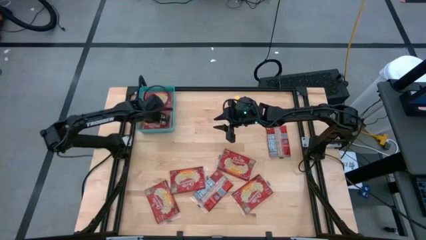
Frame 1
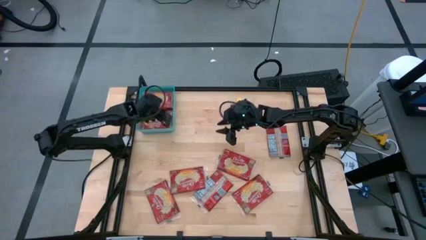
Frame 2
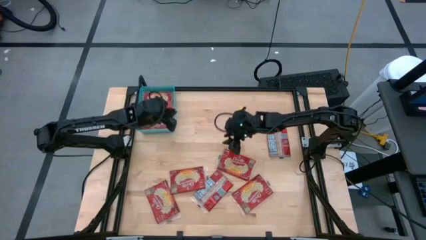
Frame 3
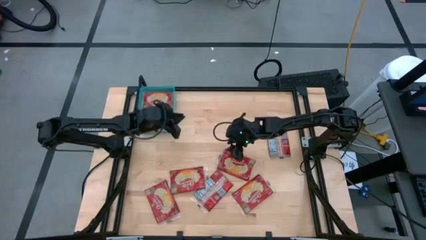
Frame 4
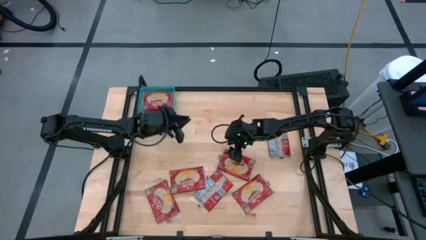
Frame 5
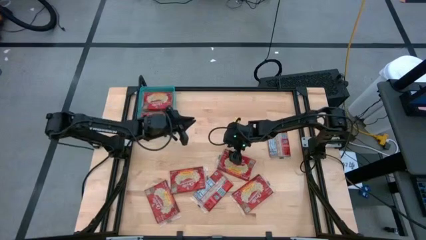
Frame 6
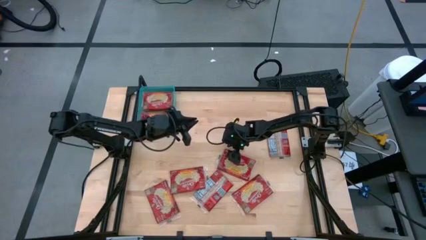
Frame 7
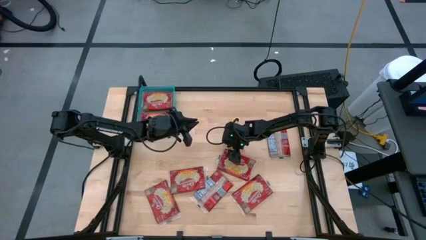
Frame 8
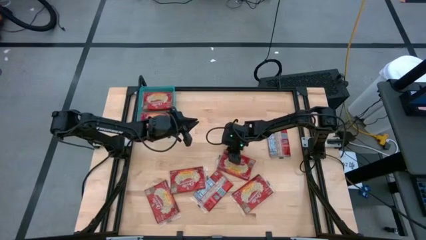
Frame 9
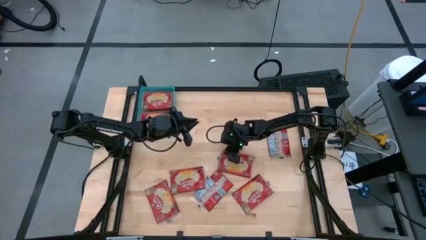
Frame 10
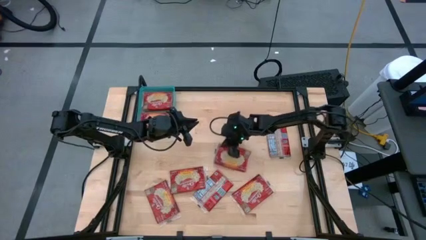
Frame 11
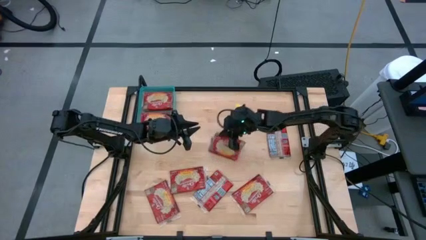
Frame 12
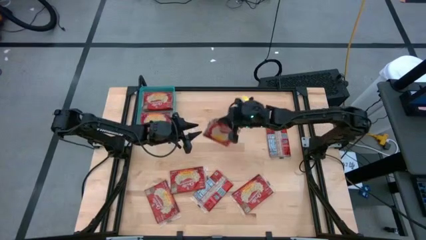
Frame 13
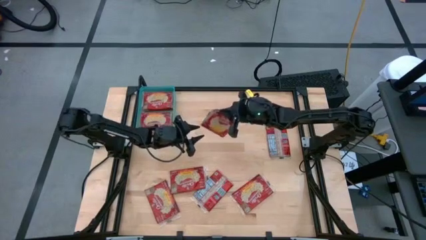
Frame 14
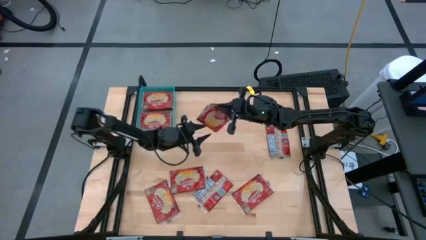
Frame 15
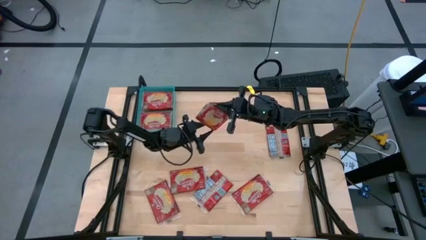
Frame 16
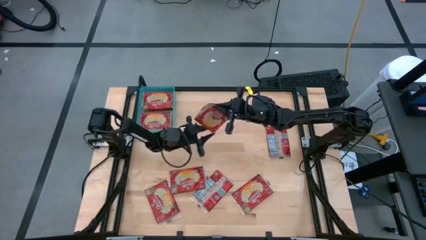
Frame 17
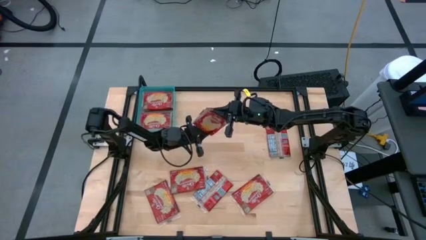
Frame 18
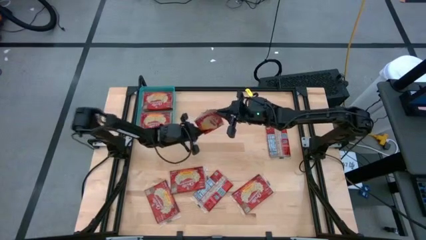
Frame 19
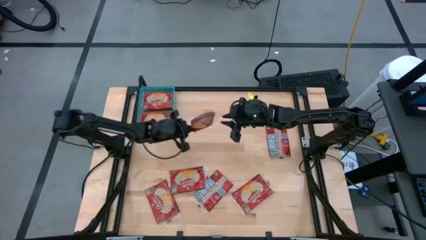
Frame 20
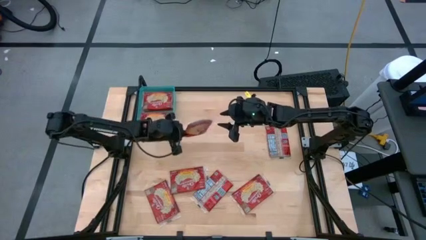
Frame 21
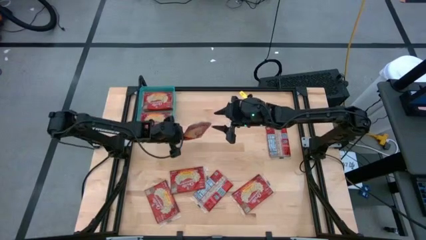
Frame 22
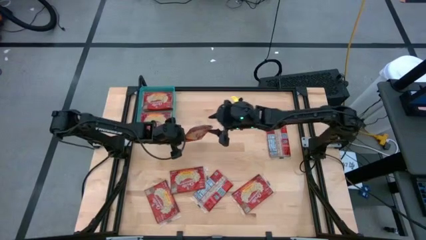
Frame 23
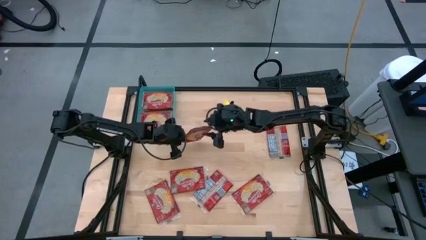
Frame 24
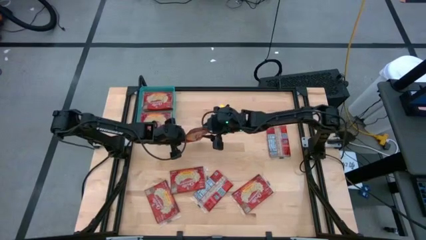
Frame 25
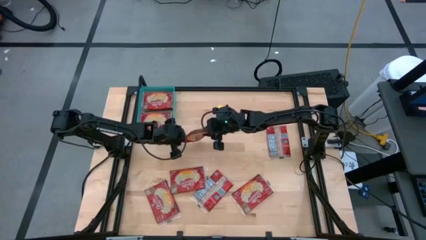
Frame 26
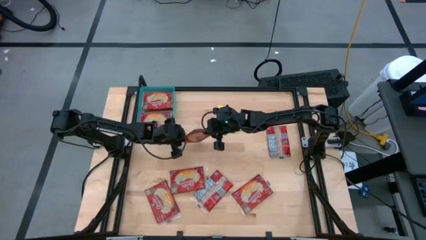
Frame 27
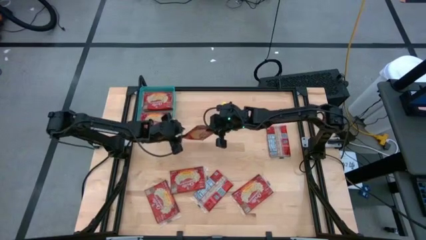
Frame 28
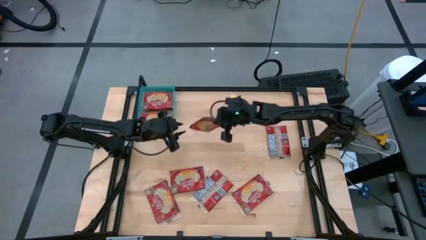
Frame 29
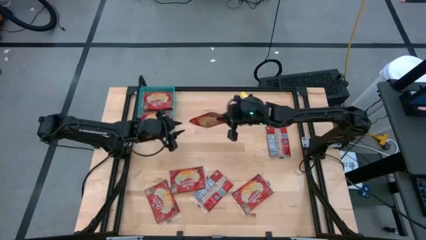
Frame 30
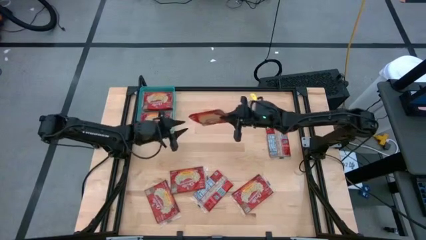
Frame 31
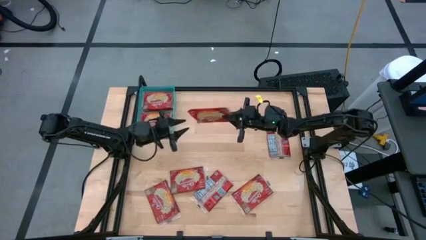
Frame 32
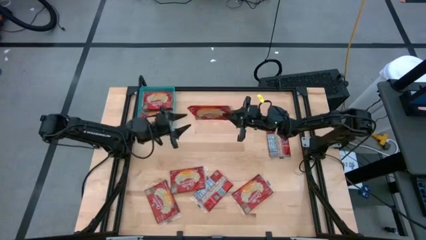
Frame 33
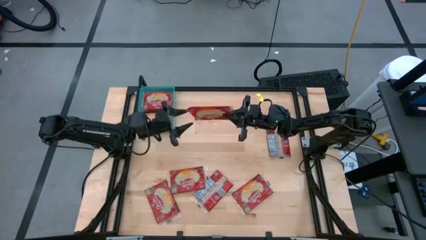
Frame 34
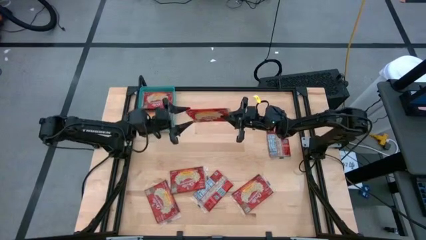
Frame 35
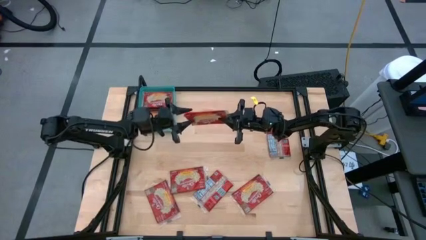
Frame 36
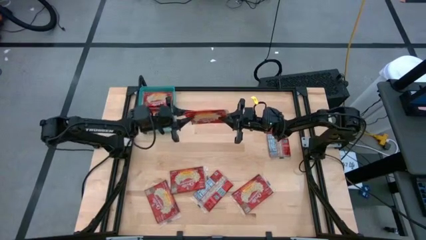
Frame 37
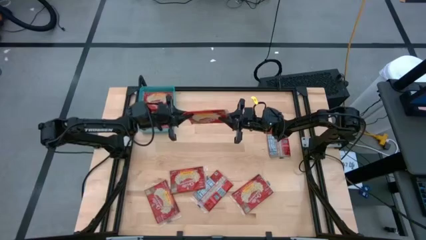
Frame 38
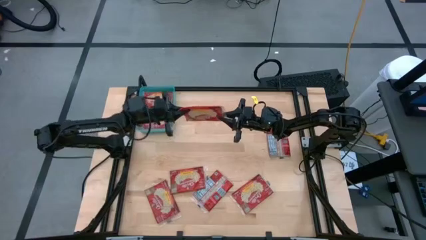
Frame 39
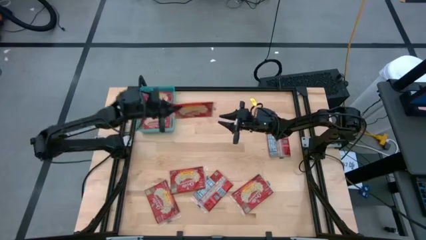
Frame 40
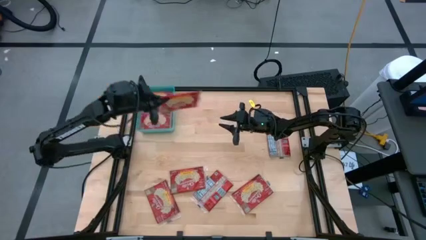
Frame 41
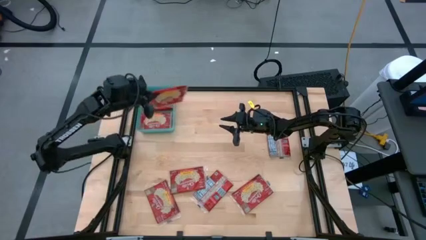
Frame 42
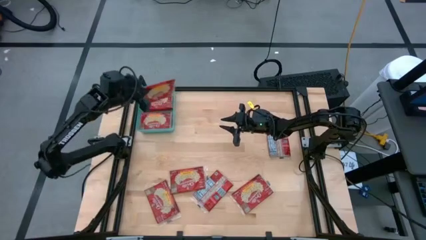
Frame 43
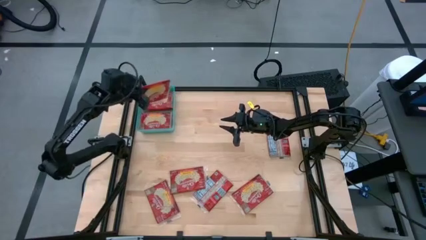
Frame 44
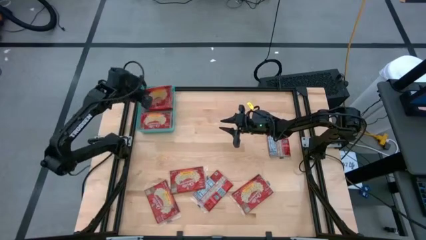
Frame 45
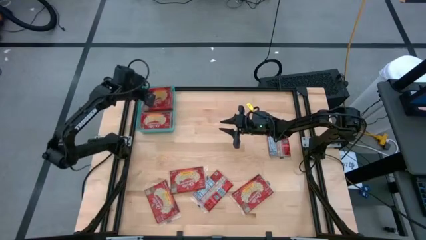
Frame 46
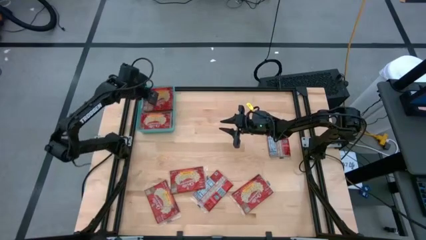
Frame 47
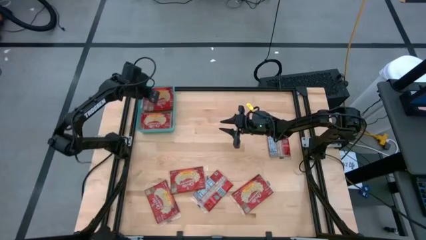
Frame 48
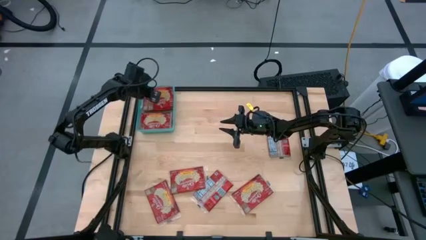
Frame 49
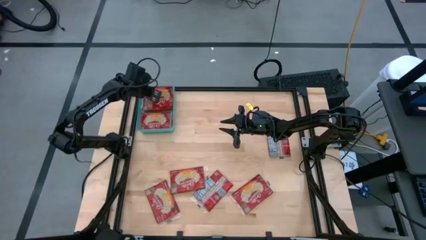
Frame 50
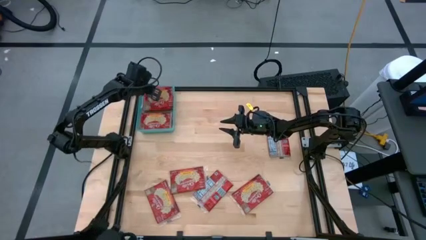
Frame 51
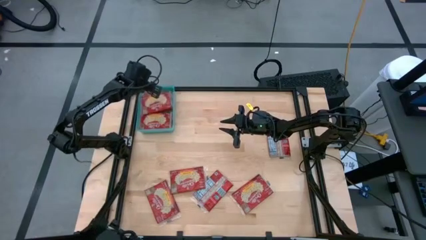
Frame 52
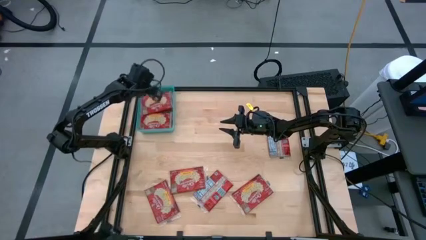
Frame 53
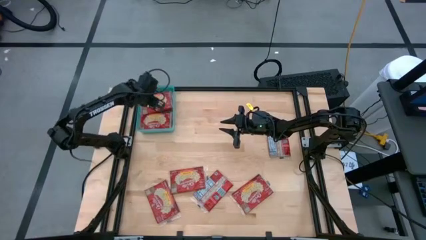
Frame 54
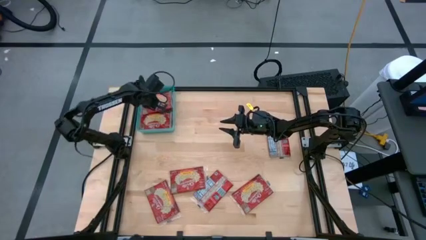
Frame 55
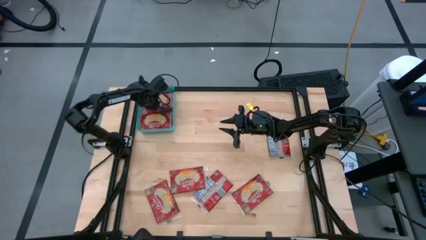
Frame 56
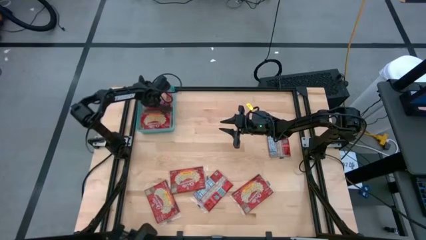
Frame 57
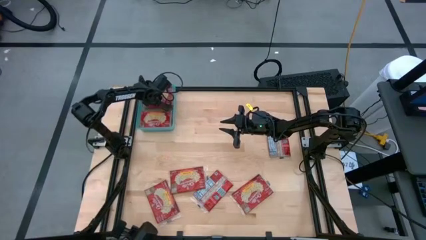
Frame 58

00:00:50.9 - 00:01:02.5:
Task: Sort popcorn bags into baskets
Put the popcorn bag into the blue bin
